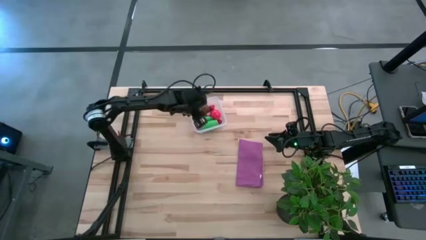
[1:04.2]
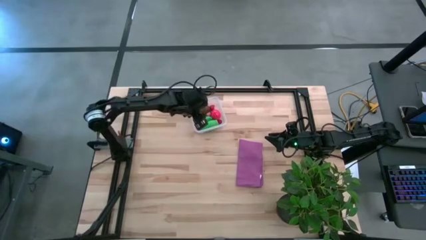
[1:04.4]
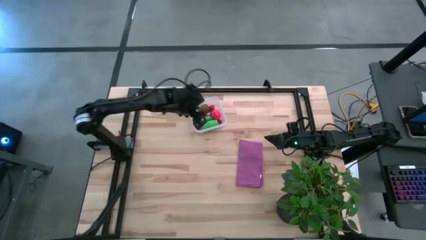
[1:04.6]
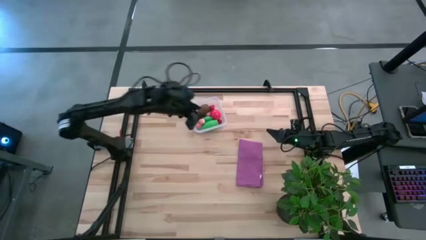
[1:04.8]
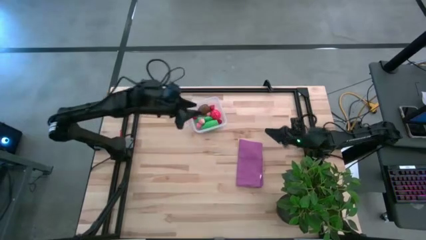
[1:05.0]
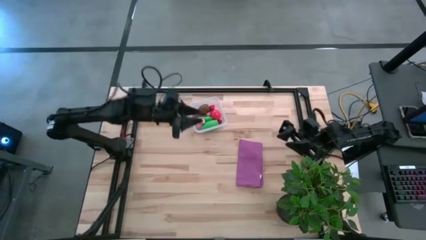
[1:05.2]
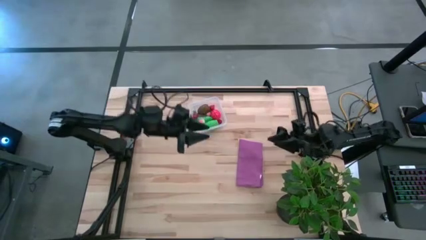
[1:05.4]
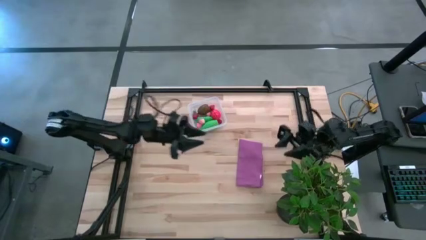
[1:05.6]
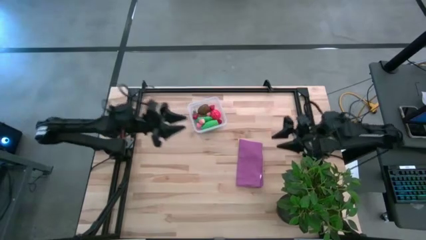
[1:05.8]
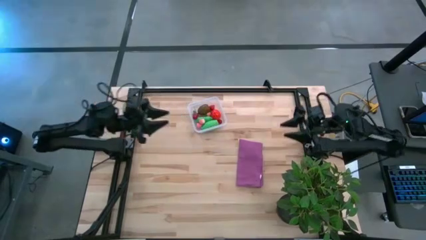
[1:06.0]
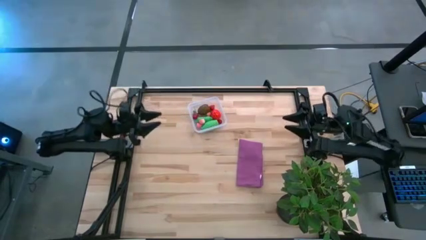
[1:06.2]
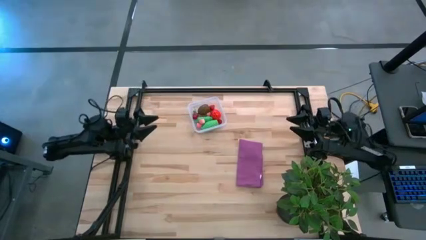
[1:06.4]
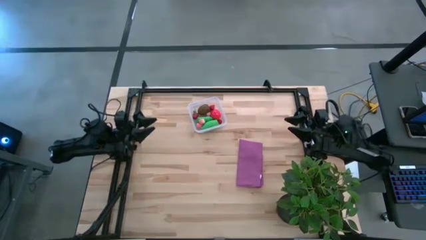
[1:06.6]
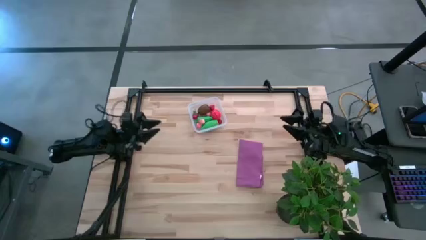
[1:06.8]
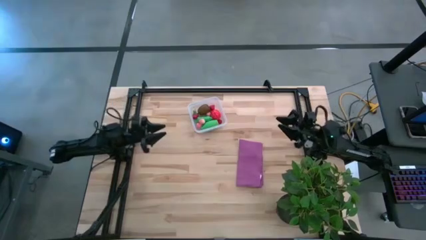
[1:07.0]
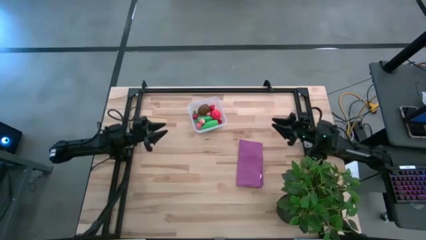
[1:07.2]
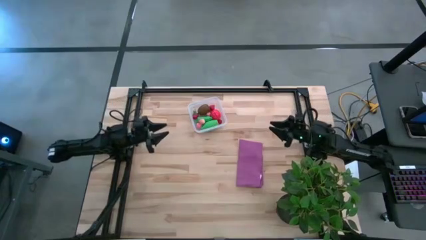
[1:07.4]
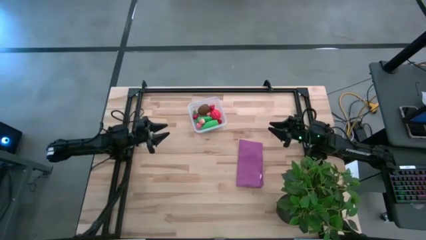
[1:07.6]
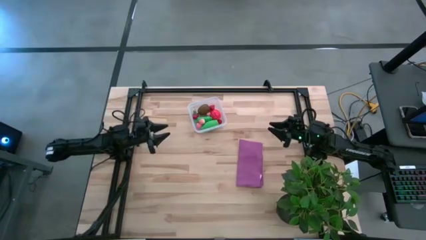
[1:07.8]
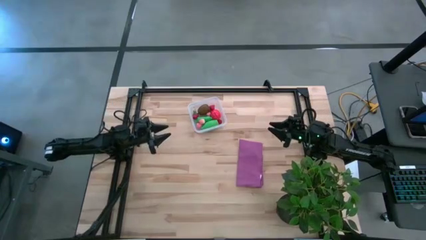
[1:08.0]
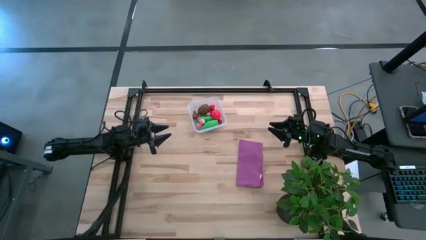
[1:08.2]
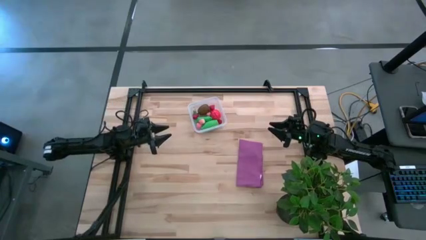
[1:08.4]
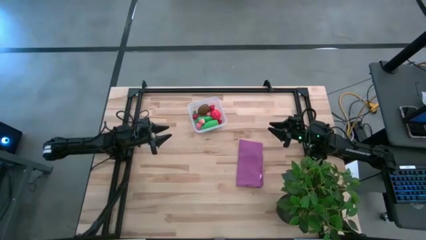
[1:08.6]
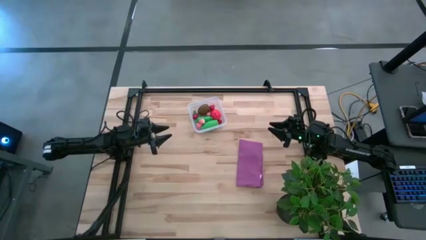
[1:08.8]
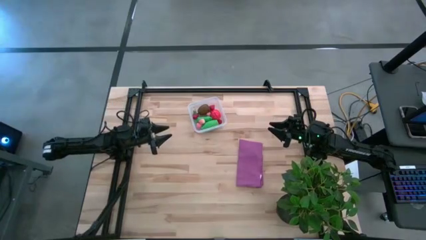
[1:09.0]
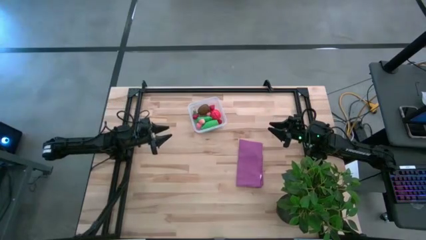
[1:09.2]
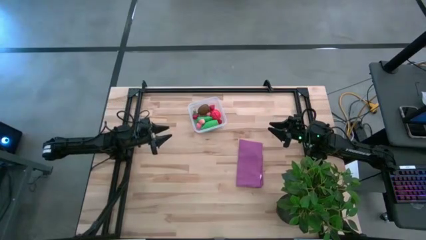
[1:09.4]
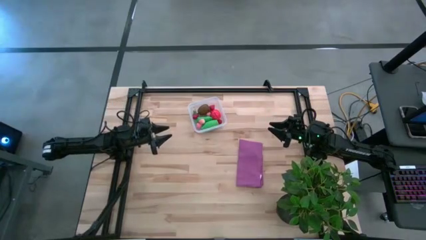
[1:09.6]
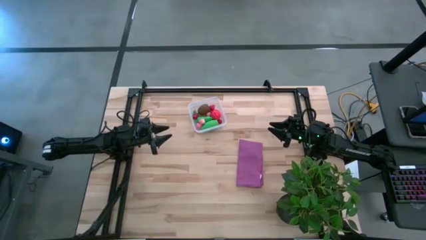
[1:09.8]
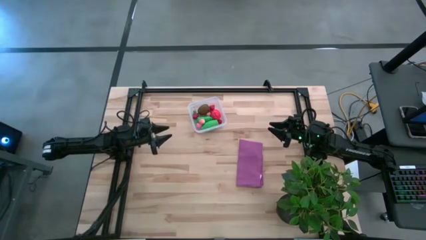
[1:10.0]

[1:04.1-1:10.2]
Task: Pick and placing Produce into tupperware
Return to Home Position

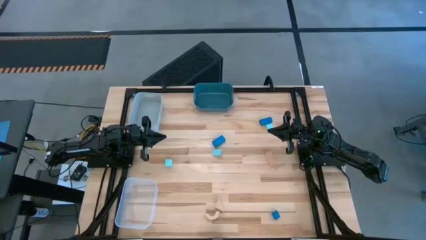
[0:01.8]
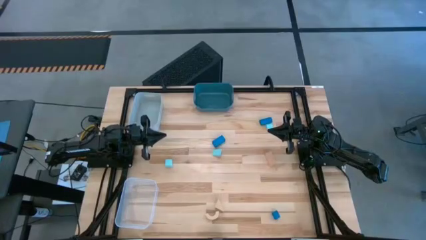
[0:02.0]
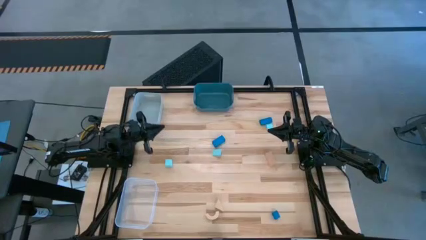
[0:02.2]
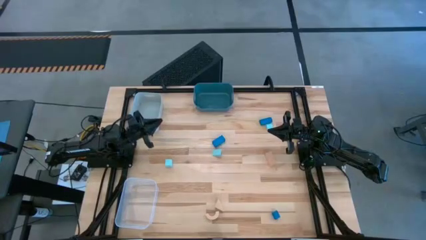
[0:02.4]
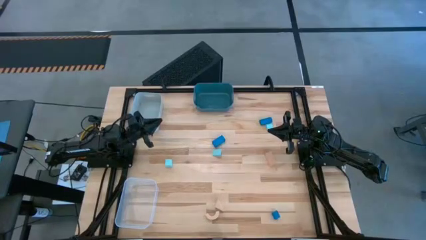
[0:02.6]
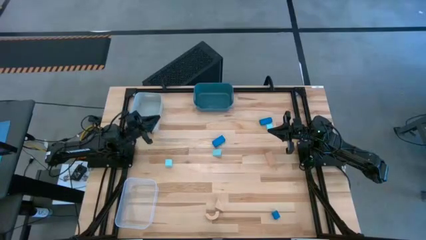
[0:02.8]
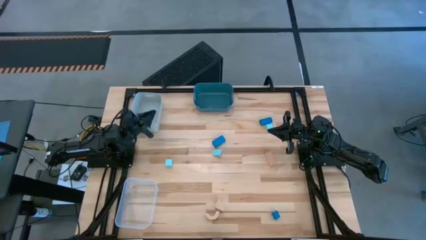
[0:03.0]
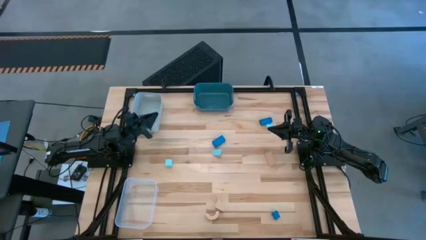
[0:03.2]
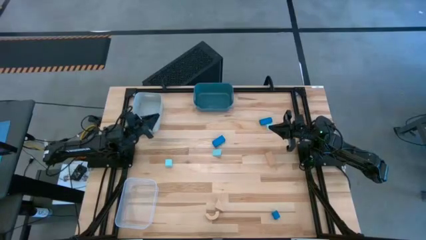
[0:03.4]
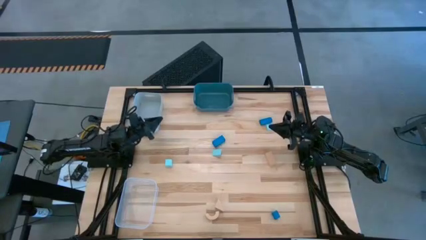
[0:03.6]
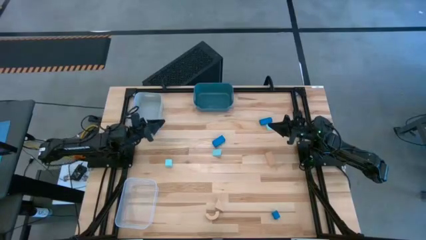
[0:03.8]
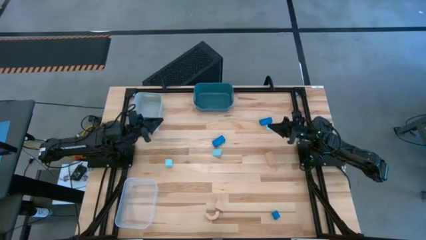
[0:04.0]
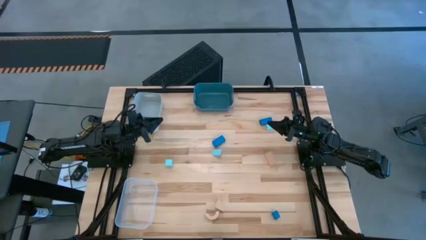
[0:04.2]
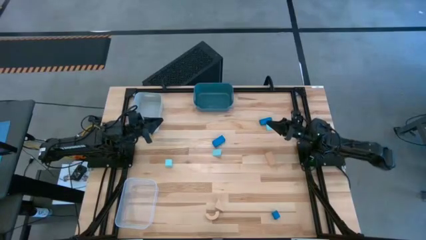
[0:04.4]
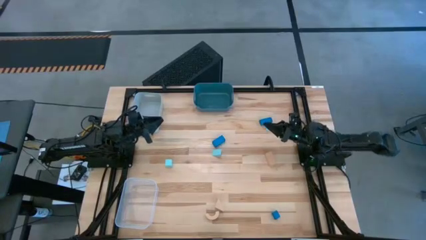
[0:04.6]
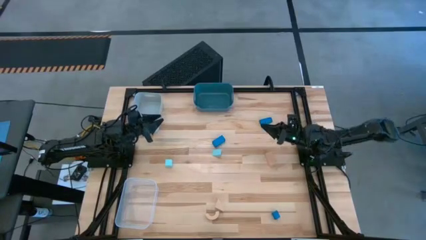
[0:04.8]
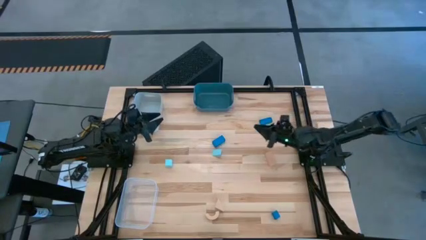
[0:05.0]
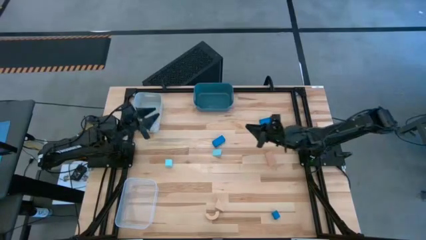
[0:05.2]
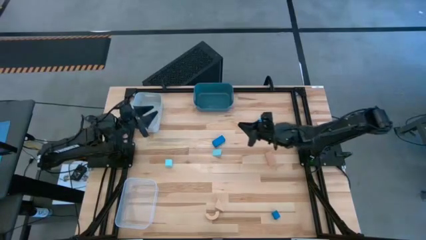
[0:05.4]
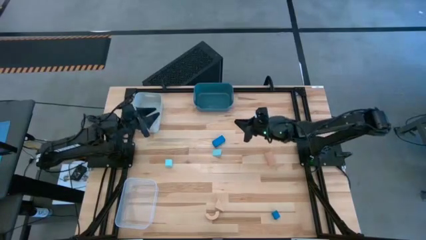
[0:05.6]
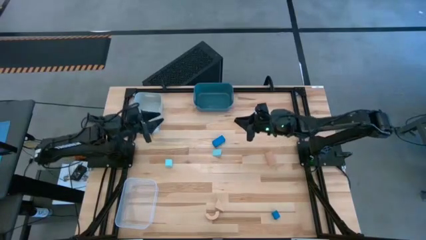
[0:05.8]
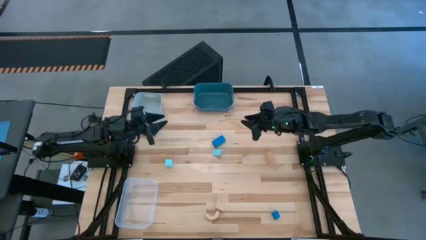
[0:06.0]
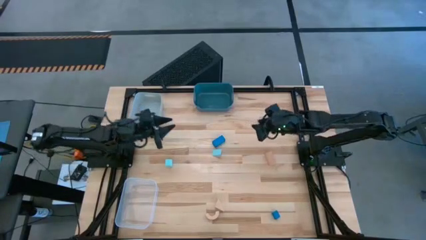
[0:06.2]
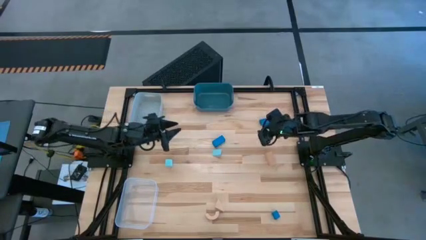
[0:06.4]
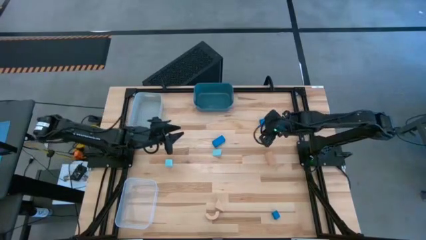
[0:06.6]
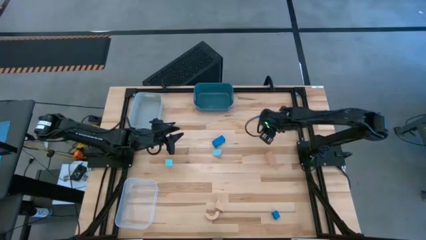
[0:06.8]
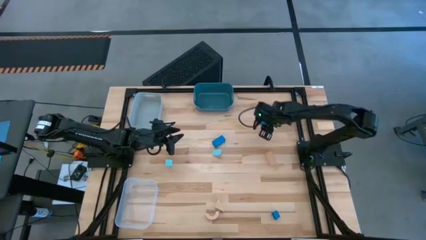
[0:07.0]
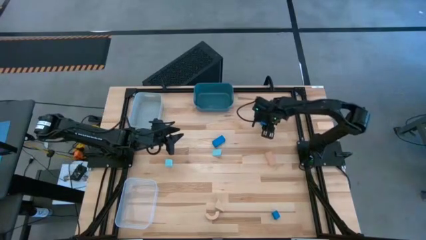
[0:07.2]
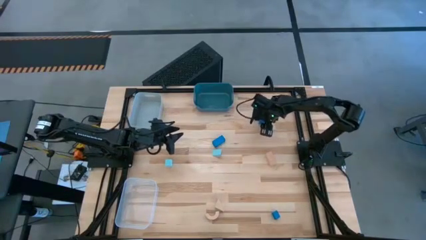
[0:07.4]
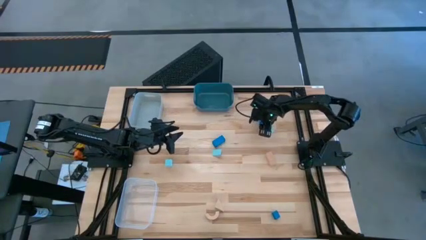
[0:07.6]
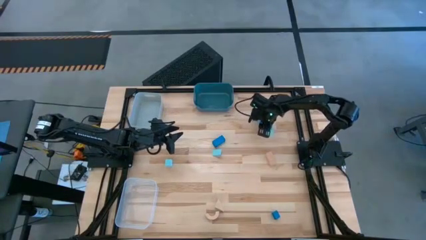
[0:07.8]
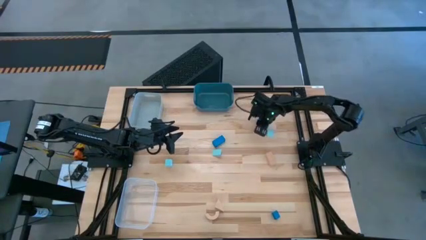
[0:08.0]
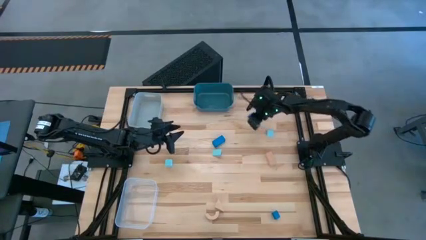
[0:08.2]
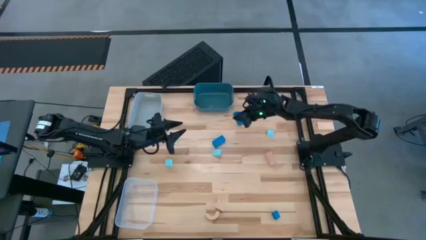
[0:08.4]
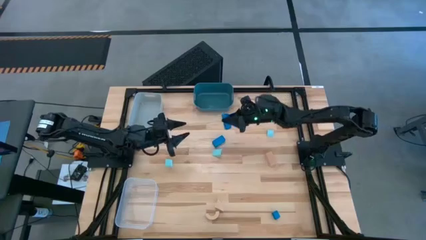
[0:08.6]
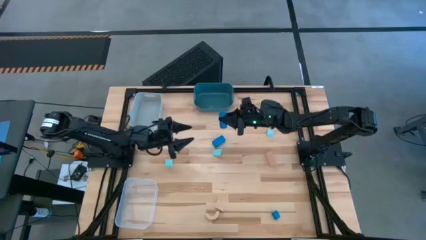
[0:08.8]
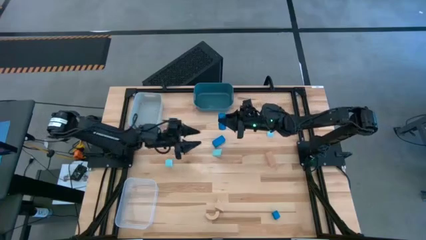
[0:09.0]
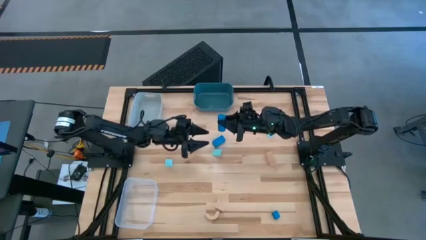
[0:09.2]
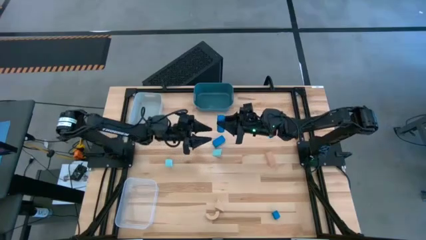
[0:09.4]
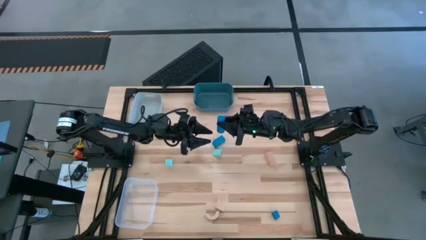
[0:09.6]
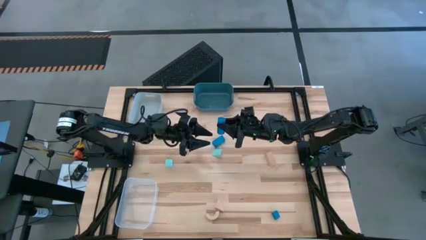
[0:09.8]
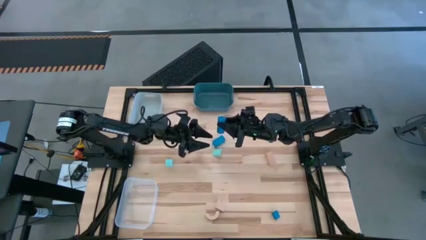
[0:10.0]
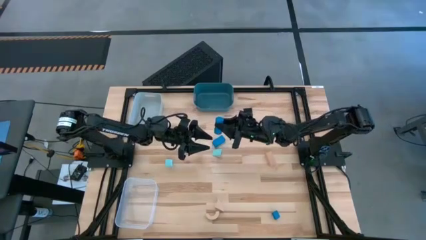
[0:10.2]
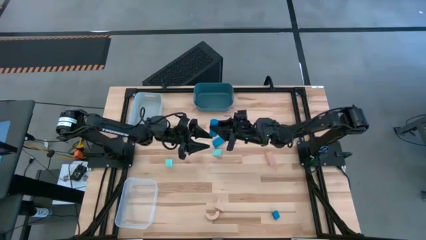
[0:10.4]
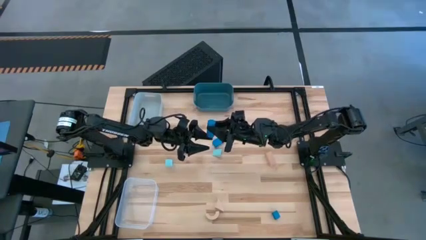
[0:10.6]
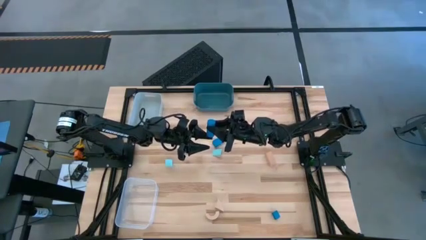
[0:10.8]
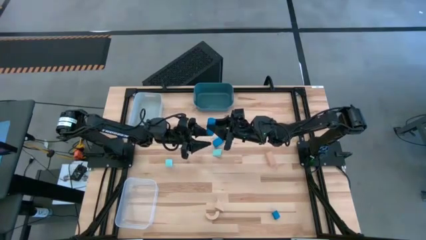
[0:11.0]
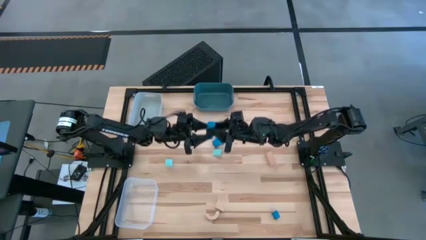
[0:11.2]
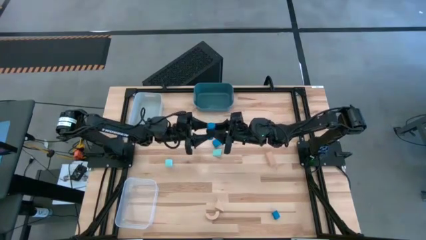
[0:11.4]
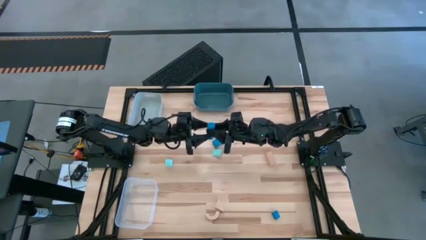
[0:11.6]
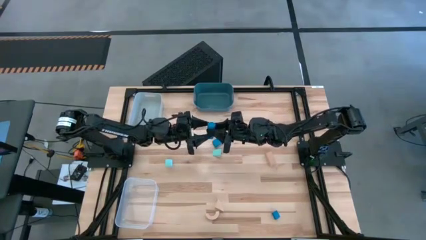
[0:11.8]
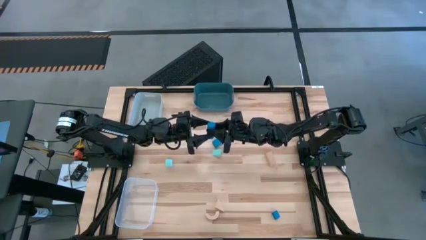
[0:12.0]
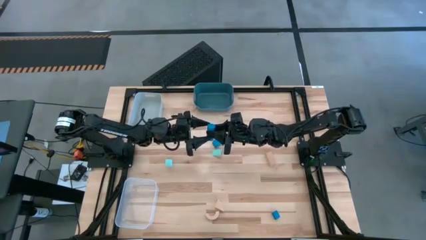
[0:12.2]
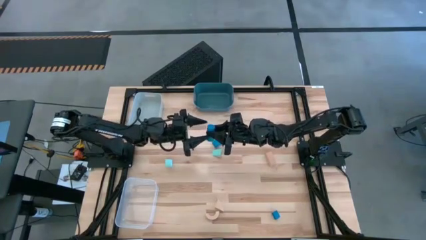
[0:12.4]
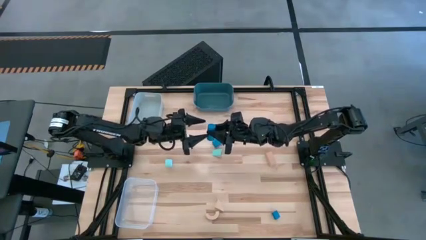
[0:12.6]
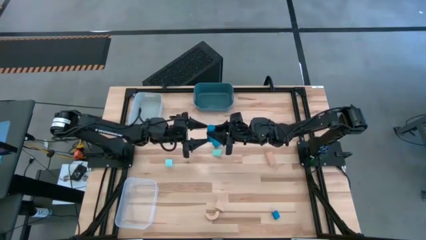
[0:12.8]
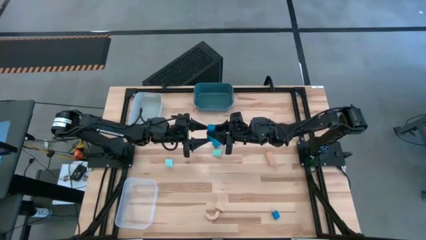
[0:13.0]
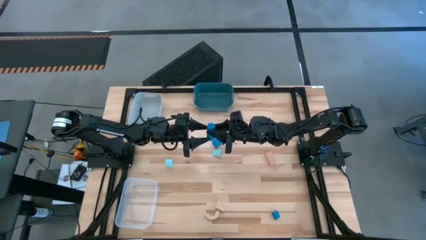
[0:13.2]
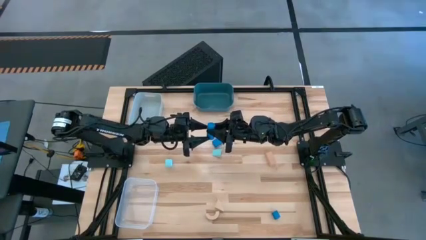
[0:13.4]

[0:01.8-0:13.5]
Task: Sort & place blocks by color
Put the top blue block into the gray bin
